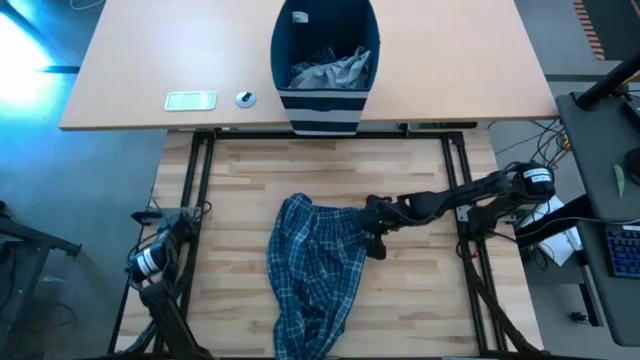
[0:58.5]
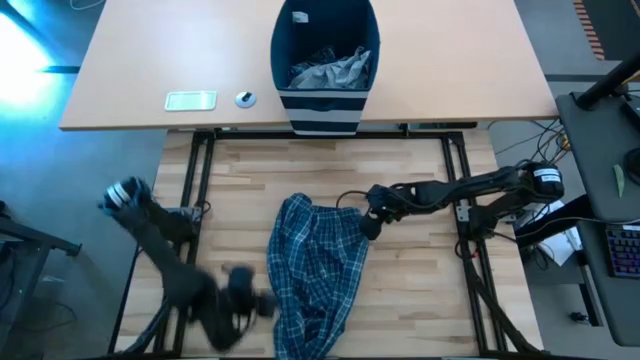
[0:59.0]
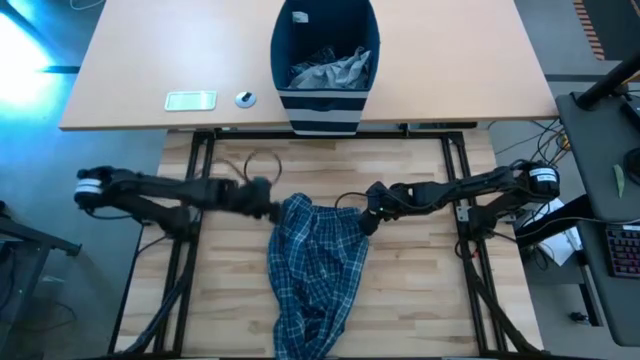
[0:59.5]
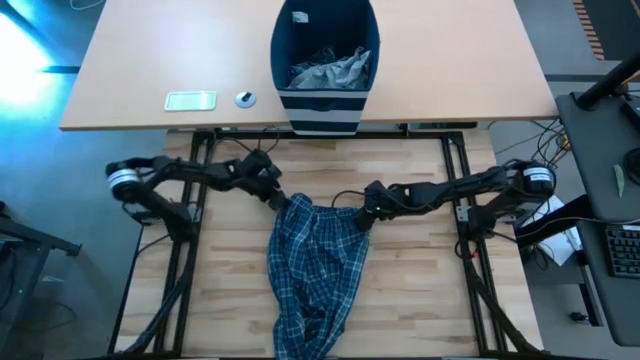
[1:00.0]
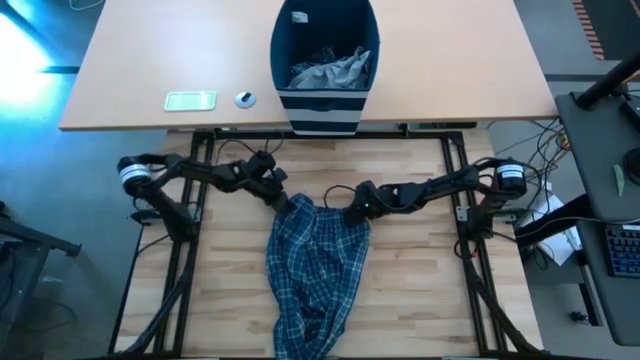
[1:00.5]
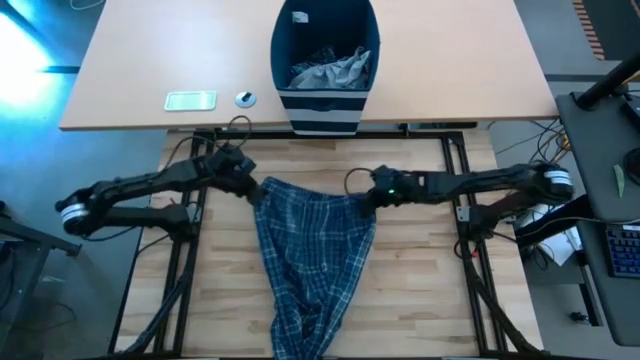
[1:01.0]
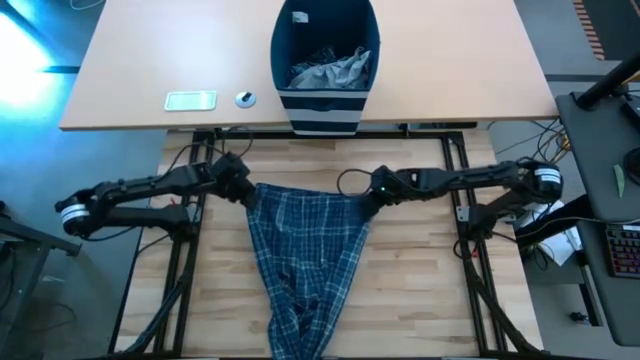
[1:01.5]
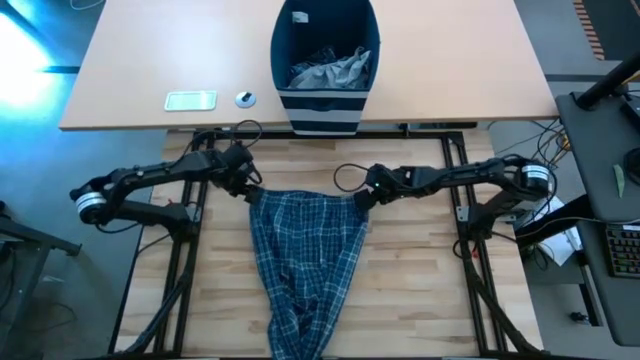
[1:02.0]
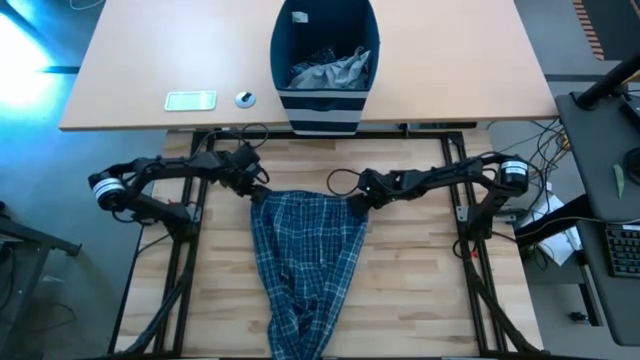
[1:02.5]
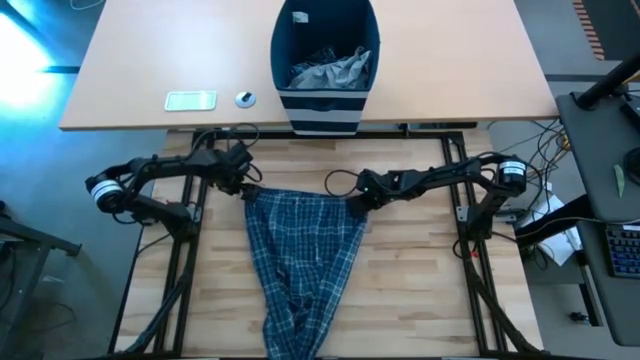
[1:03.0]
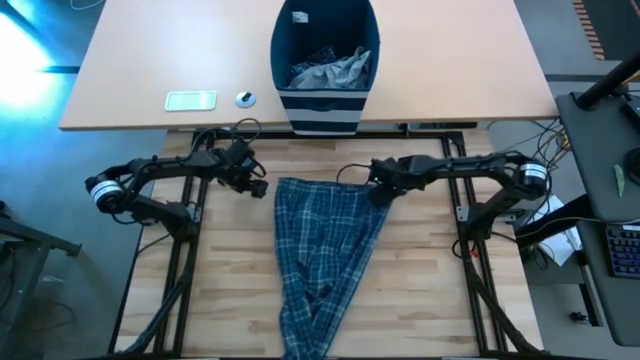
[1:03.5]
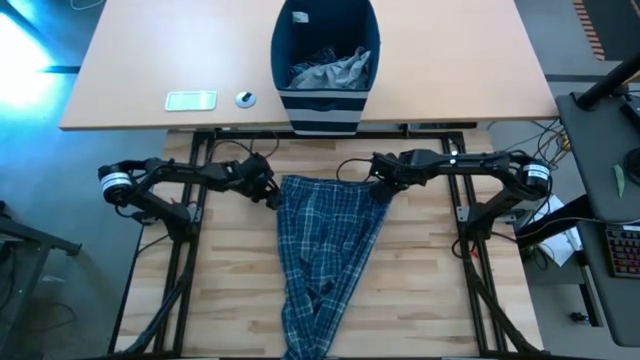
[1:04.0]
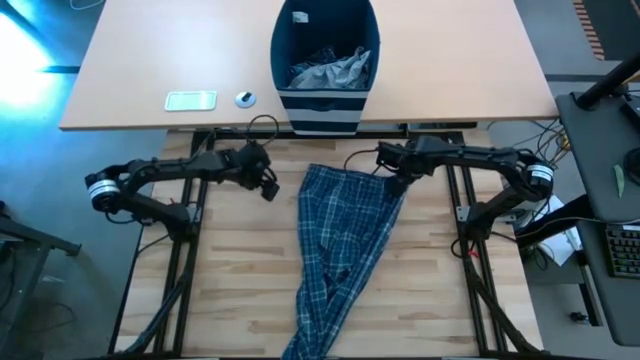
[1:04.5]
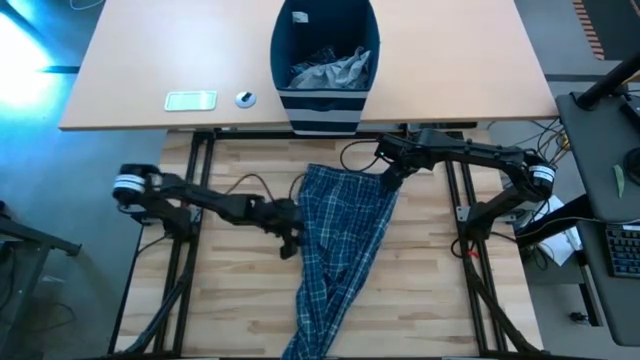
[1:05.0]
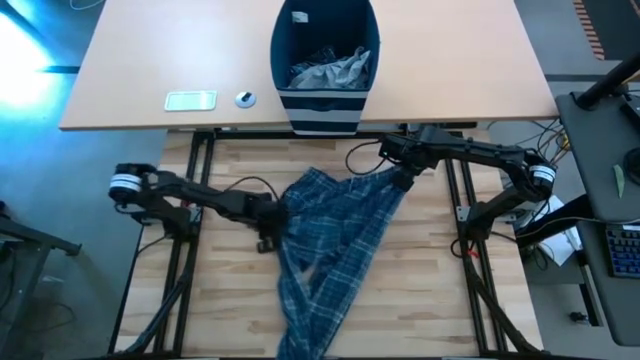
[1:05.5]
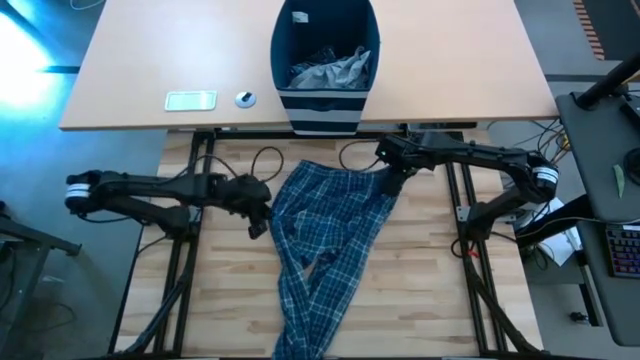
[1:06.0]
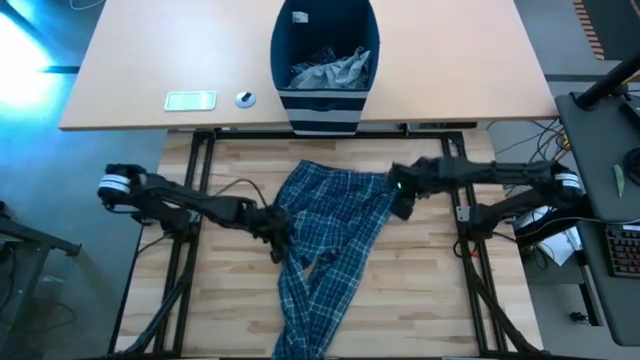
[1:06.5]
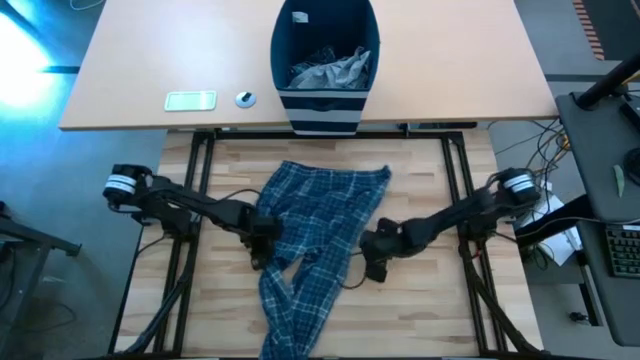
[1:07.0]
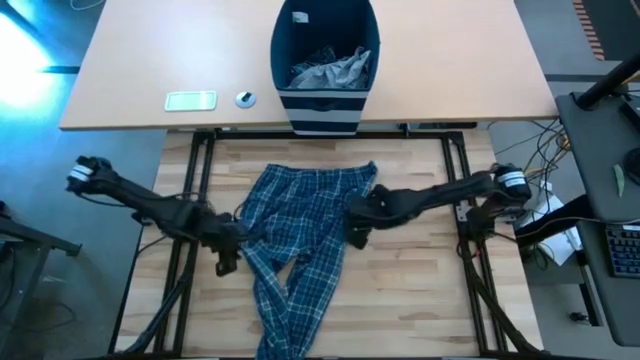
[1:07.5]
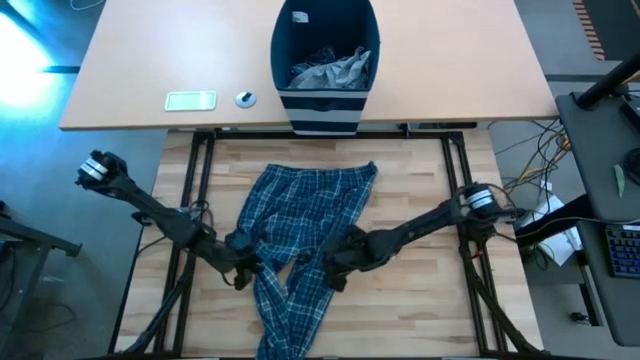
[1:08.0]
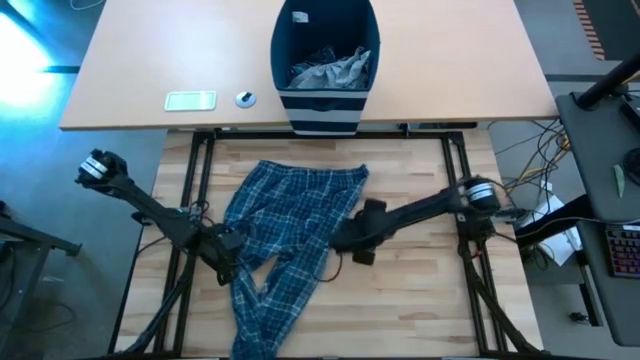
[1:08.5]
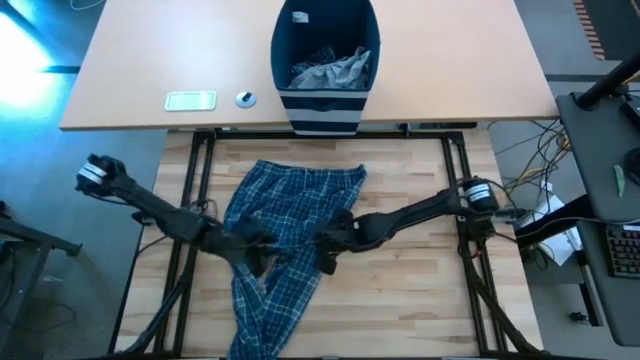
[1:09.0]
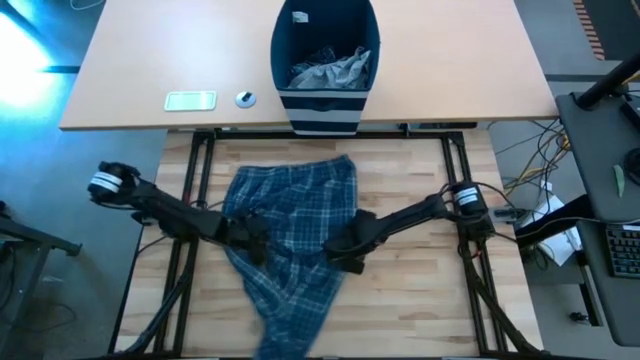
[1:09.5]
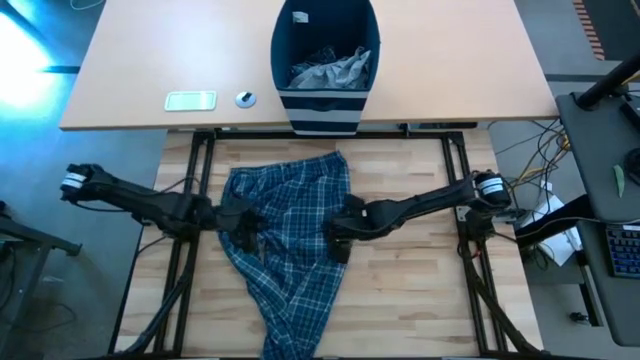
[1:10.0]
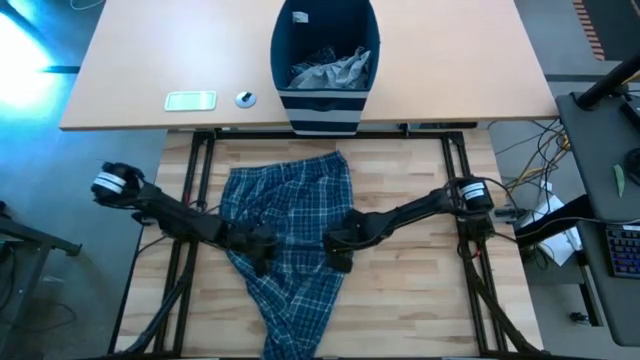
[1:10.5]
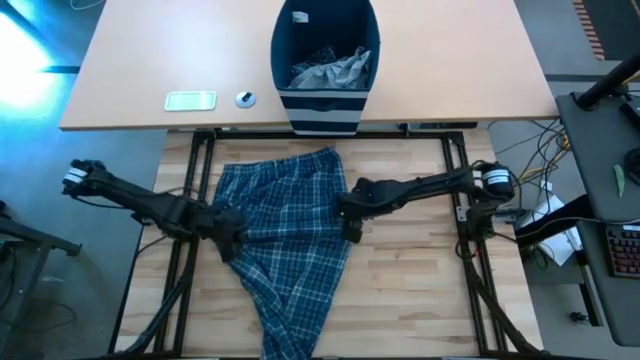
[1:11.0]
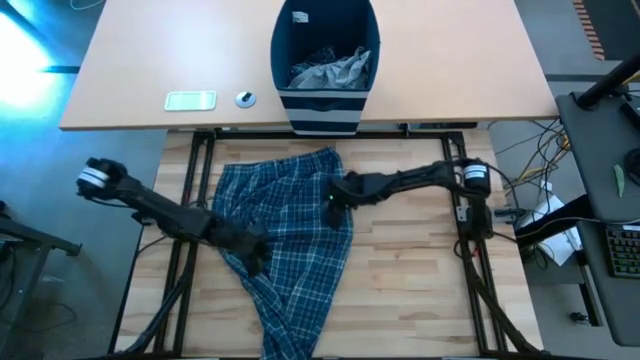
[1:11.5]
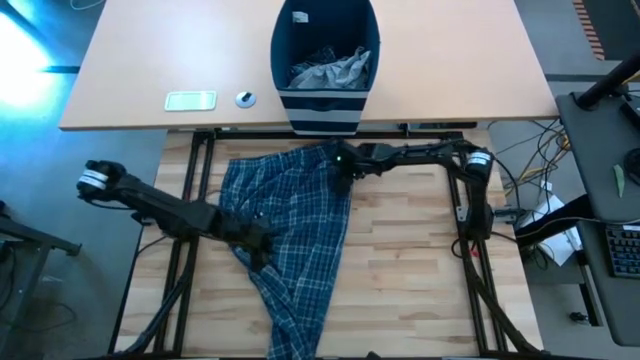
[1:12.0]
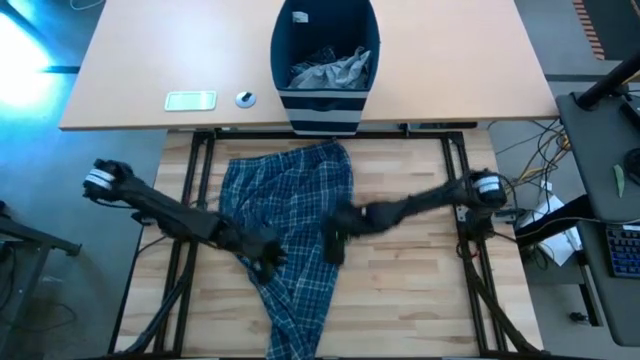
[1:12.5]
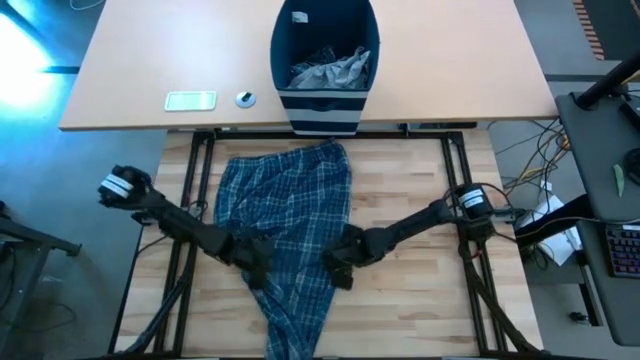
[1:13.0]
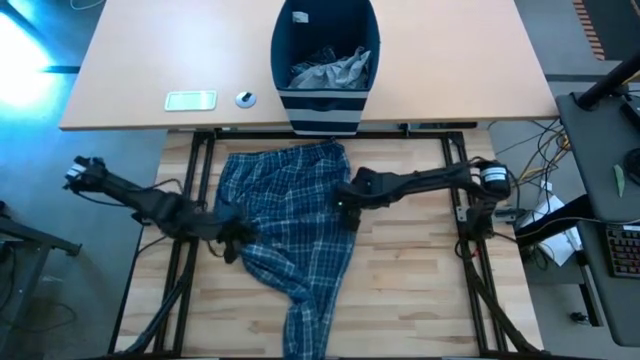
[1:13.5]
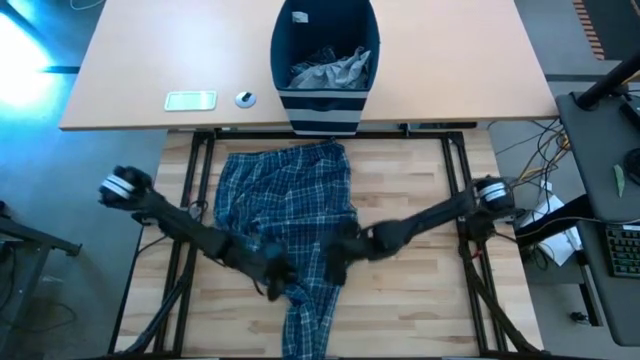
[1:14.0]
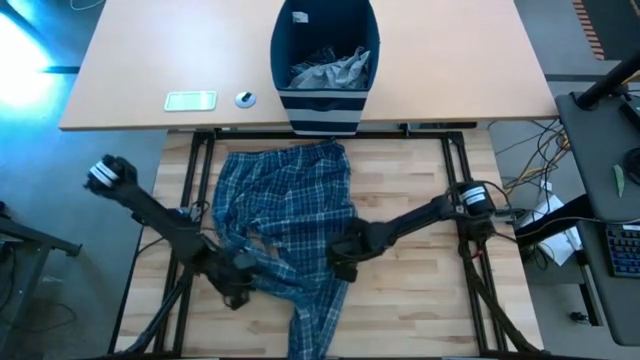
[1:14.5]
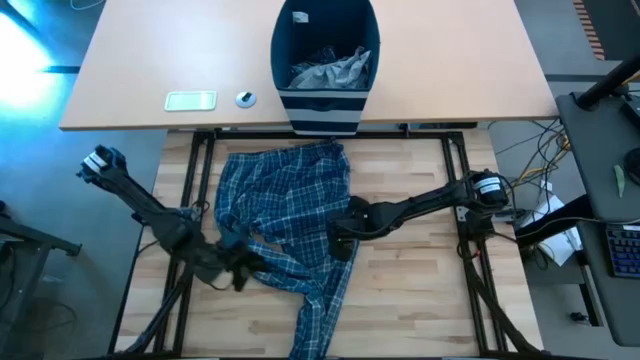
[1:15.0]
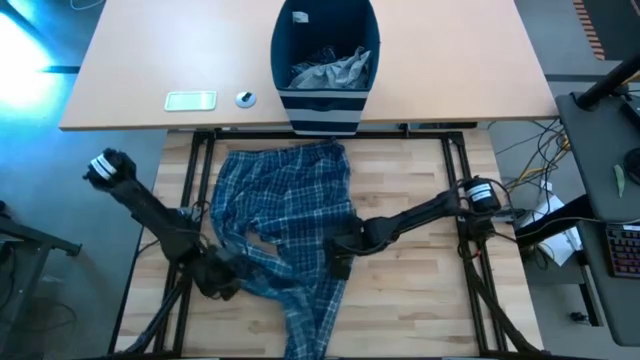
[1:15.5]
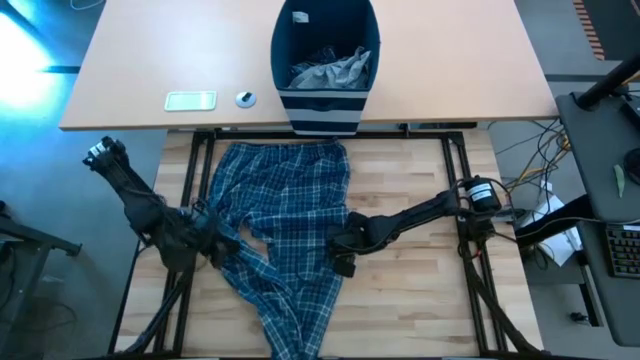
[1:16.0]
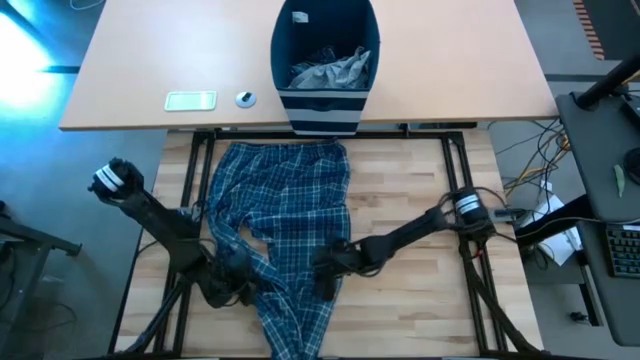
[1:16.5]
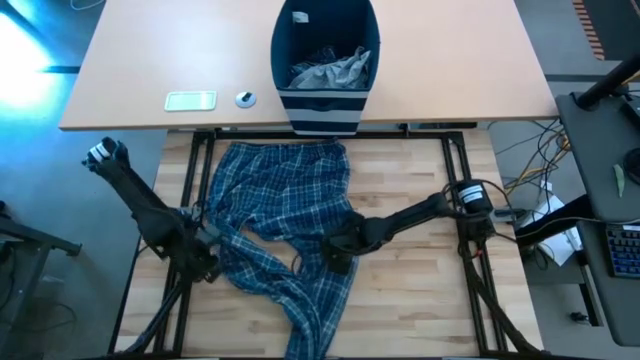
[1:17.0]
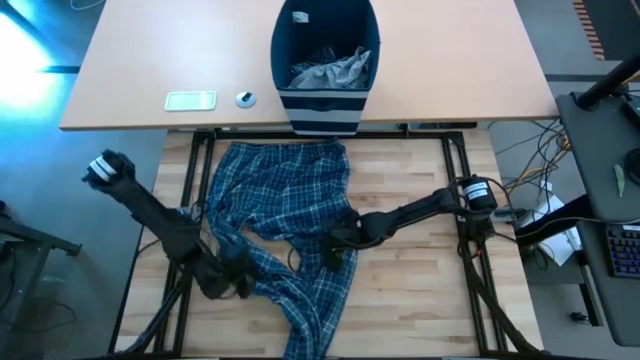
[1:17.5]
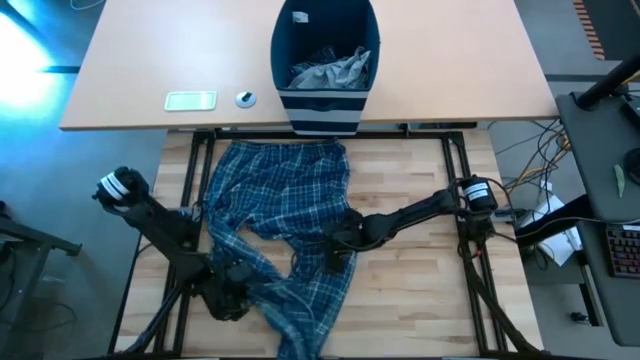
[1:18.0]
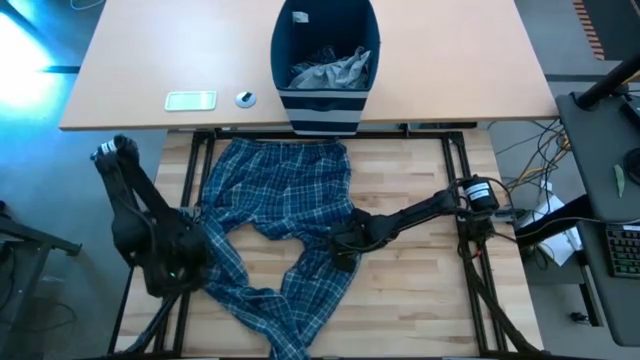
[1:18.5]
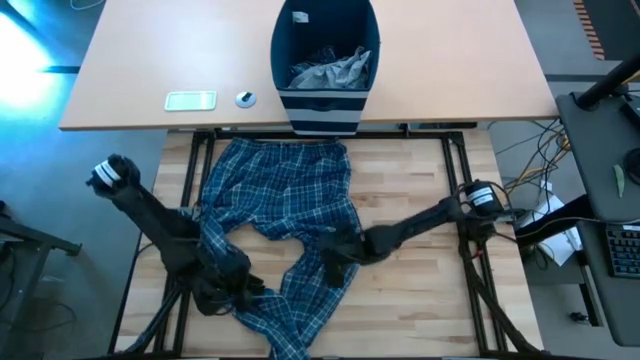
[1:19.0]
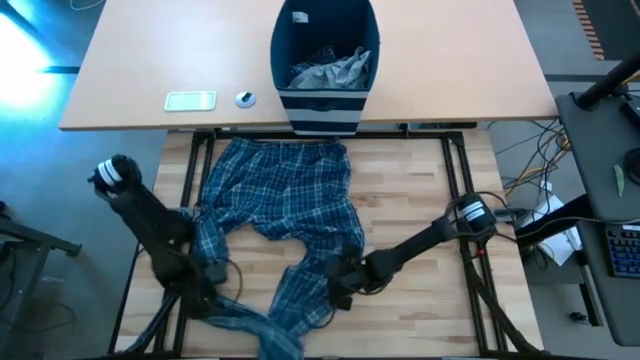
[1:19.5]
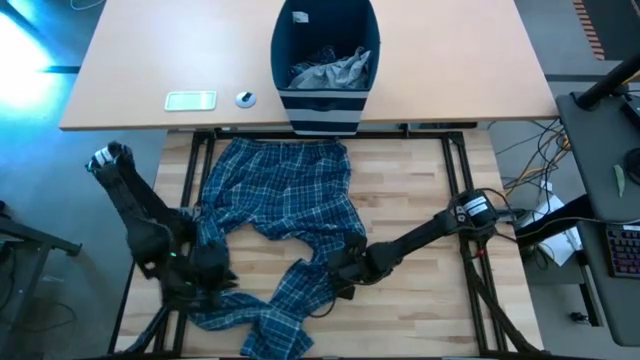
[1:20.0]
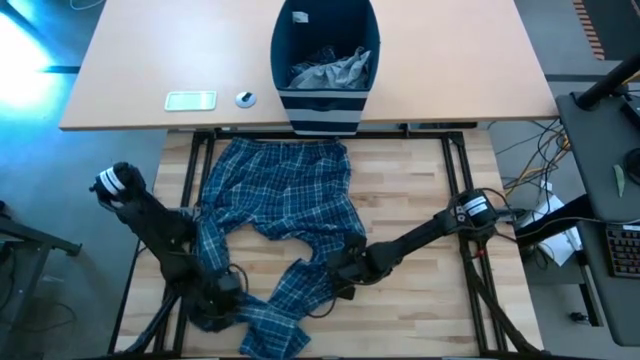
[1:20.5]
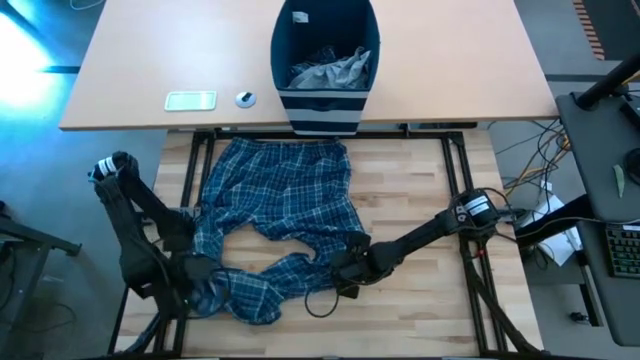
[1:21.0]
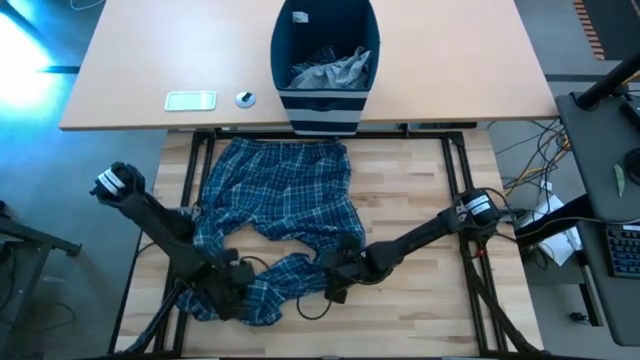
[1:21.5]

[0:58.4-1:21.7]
Task: Fold Laundry from Bin
Fold the blue patterned pants
